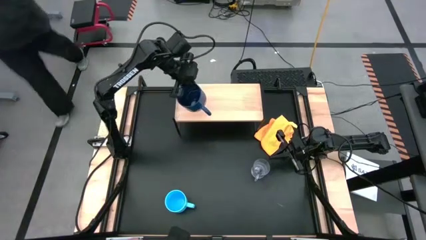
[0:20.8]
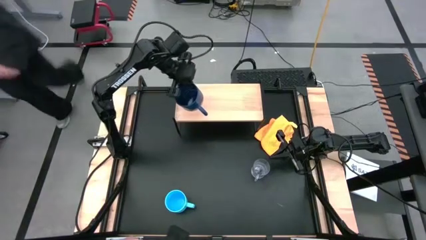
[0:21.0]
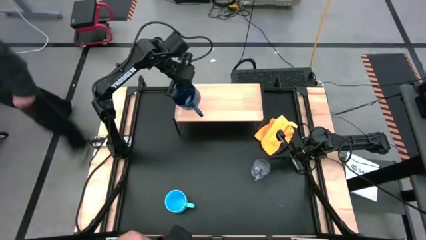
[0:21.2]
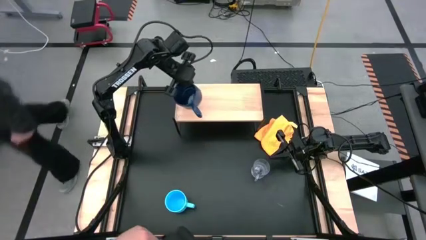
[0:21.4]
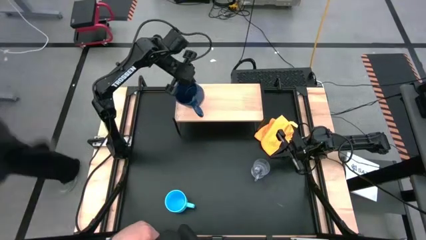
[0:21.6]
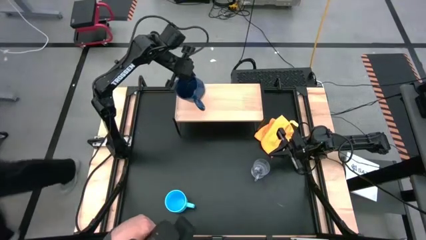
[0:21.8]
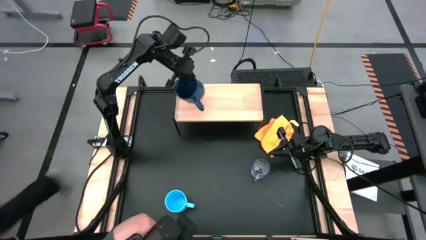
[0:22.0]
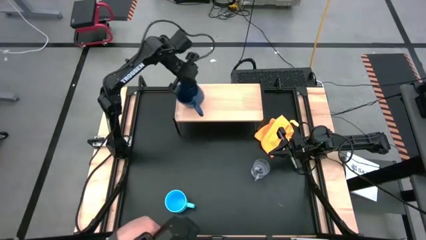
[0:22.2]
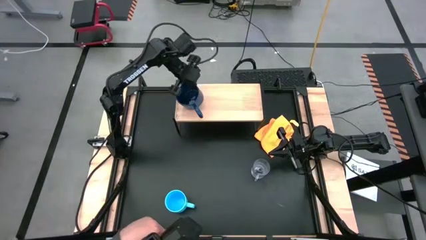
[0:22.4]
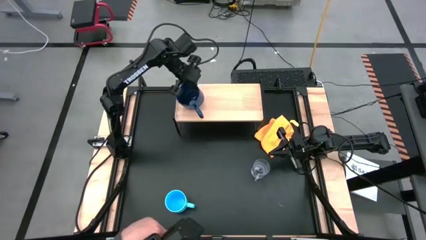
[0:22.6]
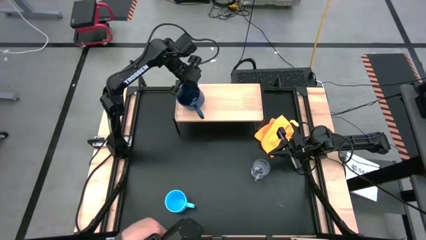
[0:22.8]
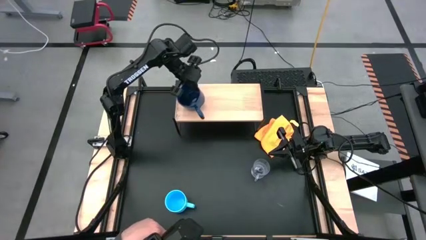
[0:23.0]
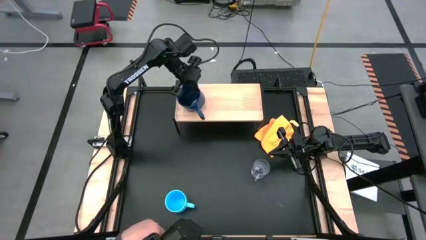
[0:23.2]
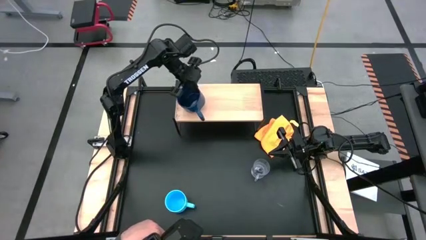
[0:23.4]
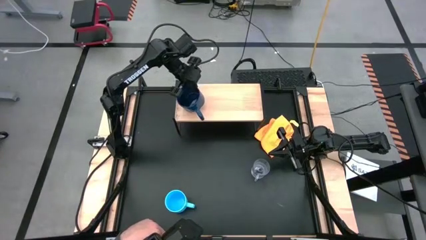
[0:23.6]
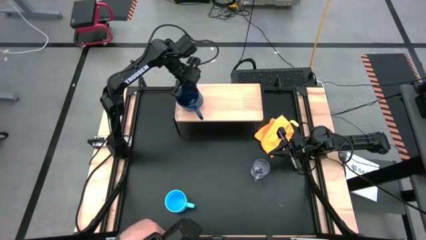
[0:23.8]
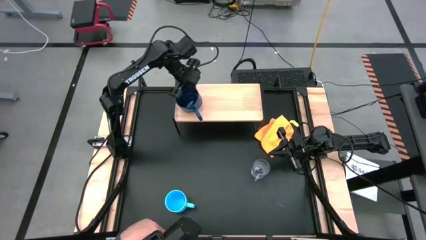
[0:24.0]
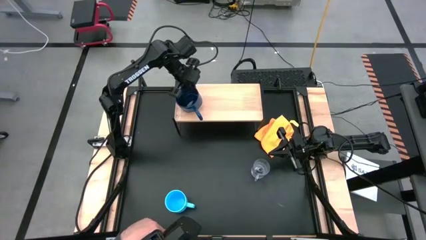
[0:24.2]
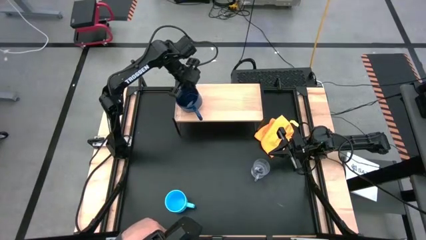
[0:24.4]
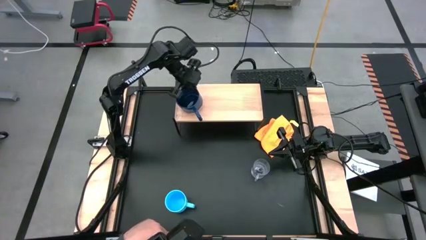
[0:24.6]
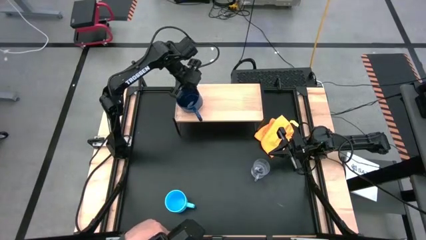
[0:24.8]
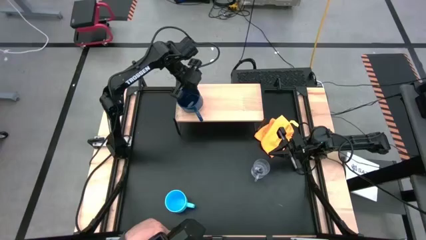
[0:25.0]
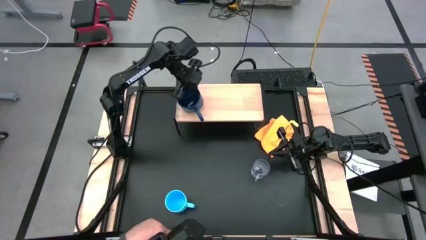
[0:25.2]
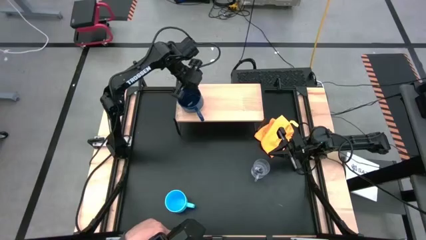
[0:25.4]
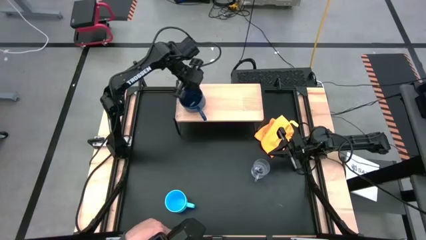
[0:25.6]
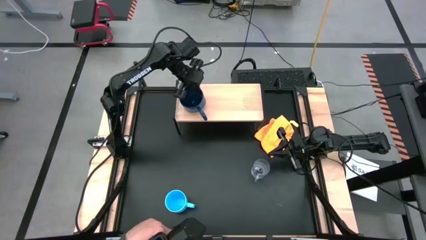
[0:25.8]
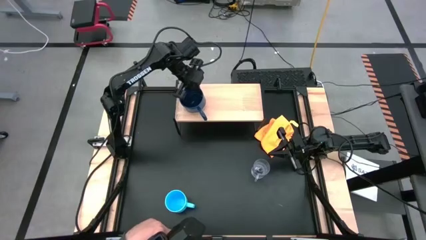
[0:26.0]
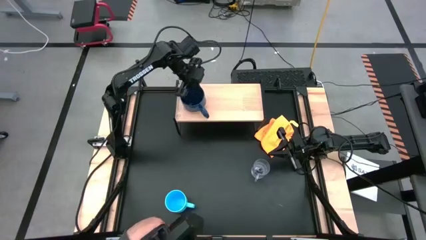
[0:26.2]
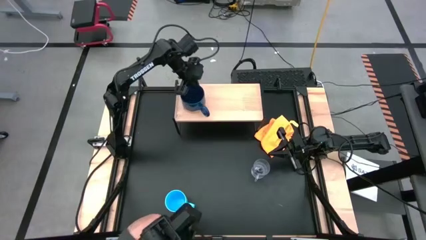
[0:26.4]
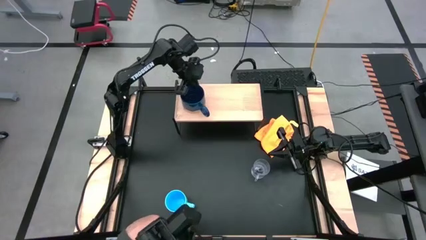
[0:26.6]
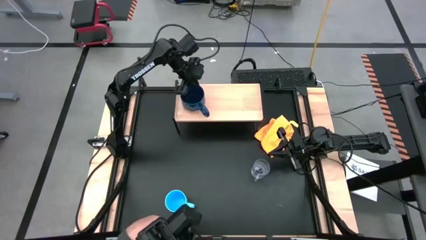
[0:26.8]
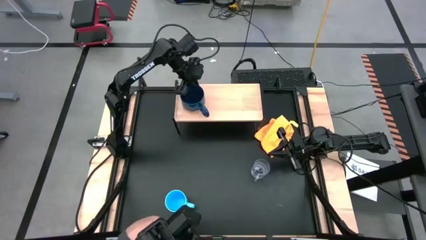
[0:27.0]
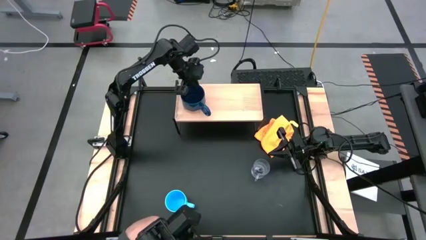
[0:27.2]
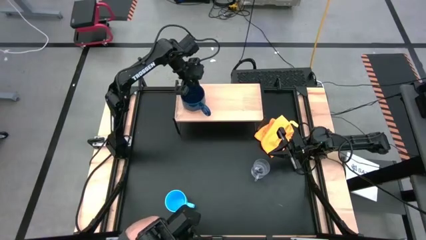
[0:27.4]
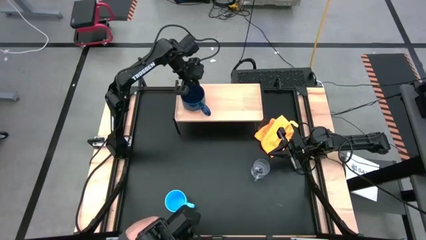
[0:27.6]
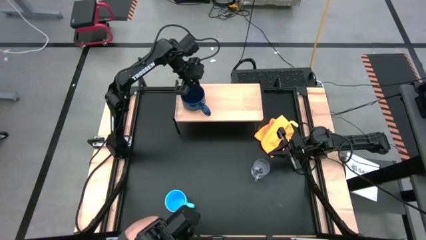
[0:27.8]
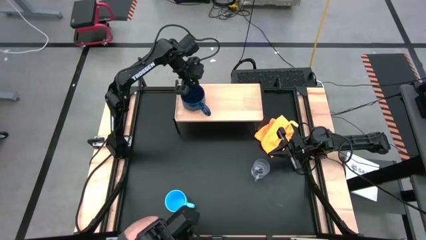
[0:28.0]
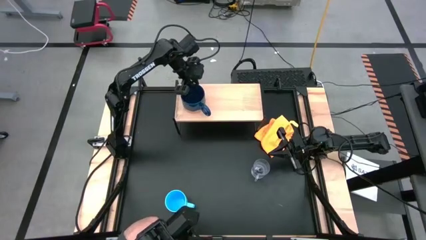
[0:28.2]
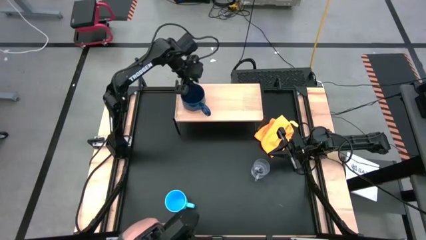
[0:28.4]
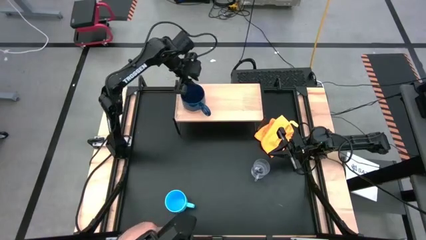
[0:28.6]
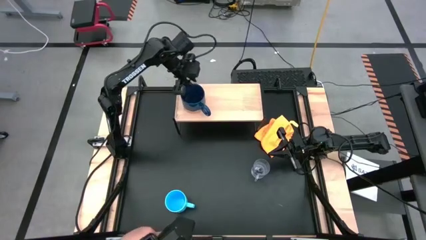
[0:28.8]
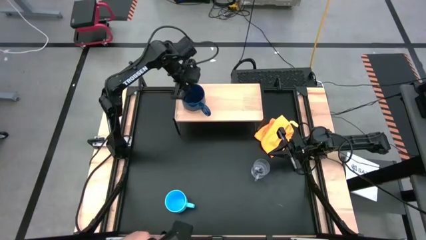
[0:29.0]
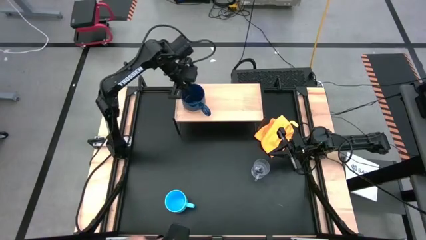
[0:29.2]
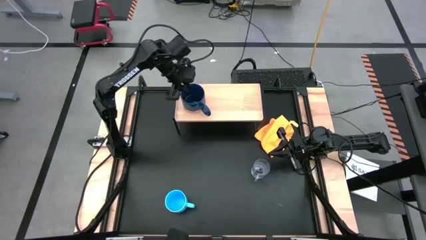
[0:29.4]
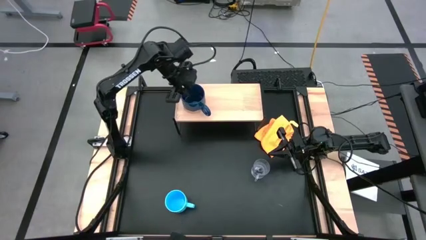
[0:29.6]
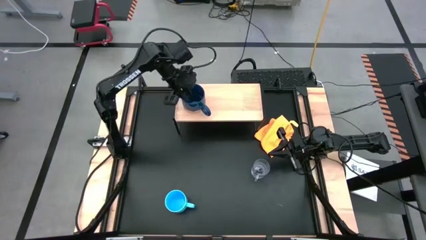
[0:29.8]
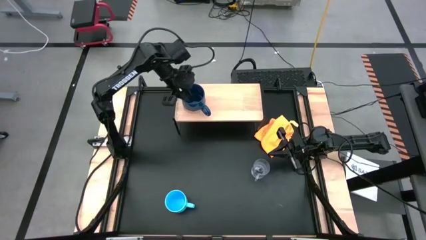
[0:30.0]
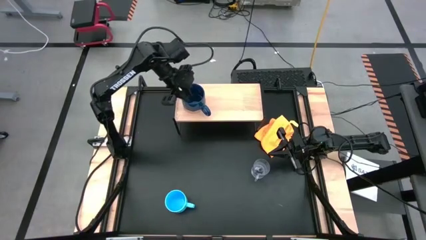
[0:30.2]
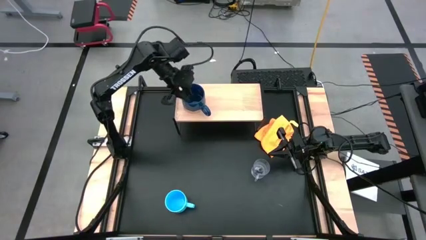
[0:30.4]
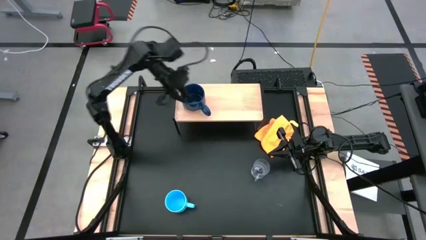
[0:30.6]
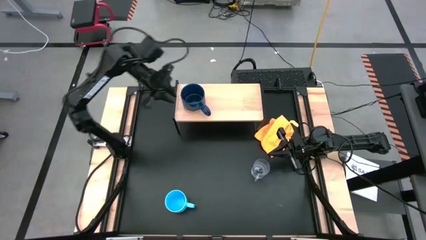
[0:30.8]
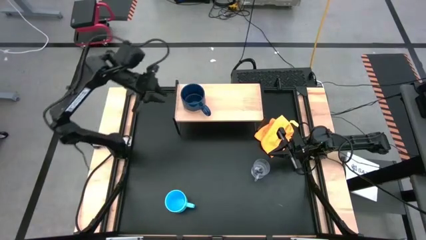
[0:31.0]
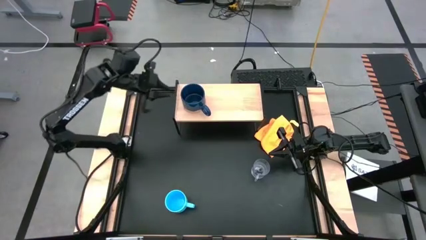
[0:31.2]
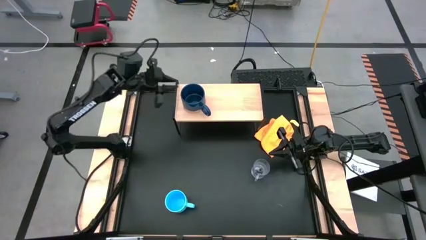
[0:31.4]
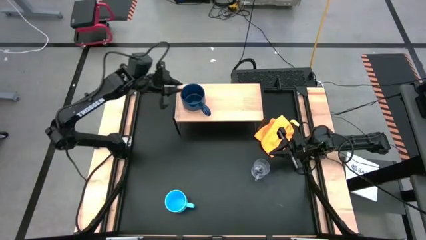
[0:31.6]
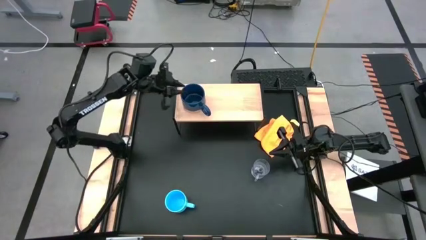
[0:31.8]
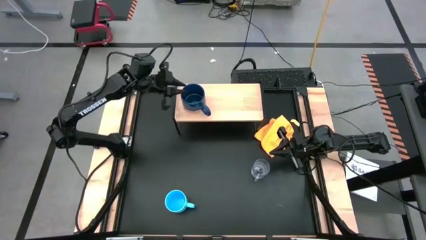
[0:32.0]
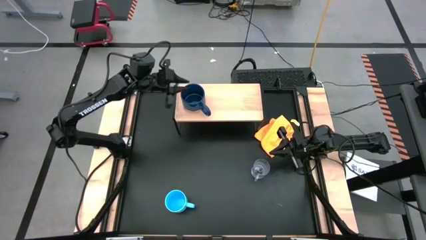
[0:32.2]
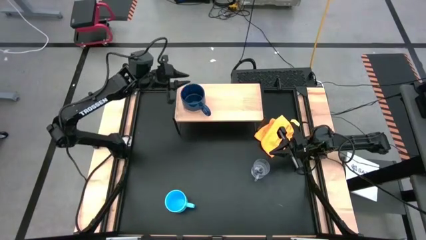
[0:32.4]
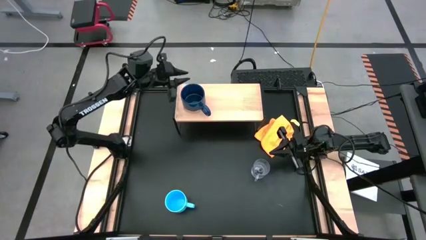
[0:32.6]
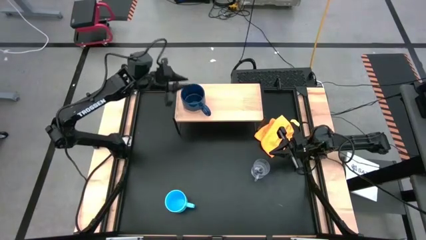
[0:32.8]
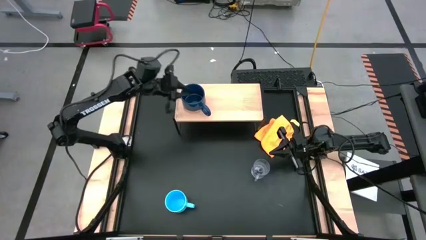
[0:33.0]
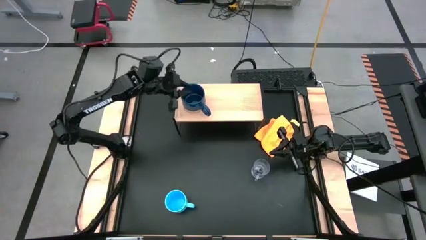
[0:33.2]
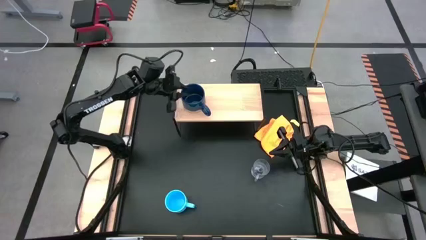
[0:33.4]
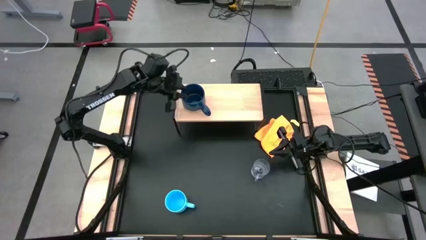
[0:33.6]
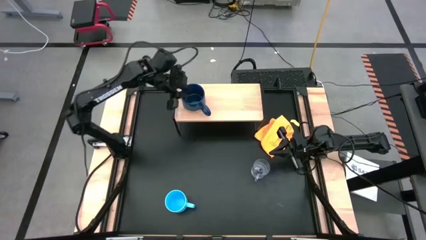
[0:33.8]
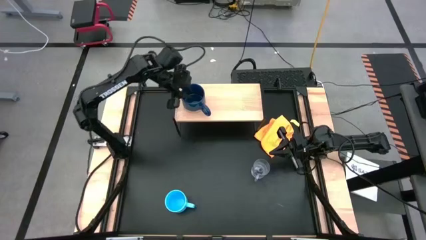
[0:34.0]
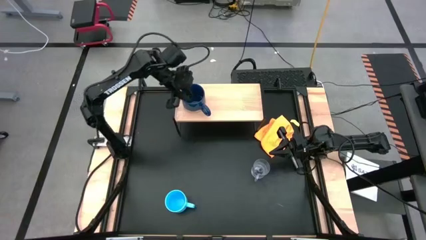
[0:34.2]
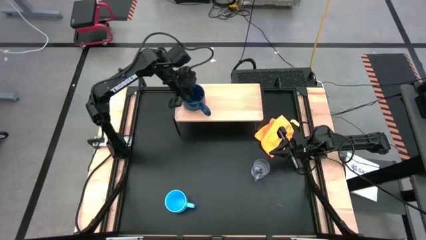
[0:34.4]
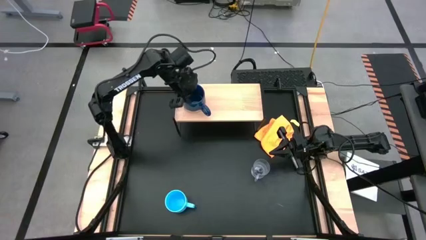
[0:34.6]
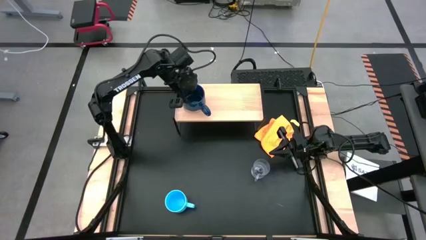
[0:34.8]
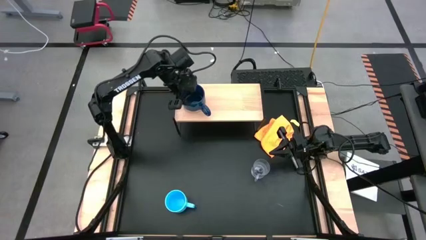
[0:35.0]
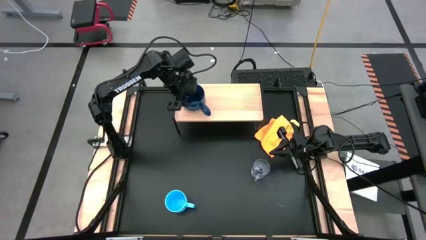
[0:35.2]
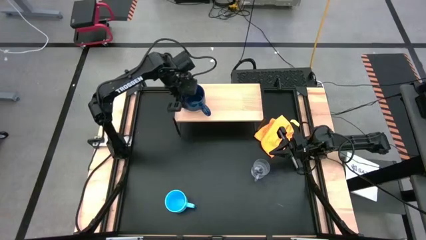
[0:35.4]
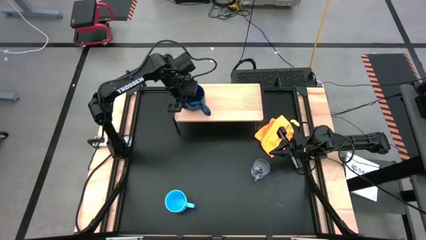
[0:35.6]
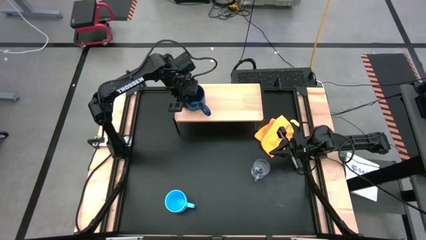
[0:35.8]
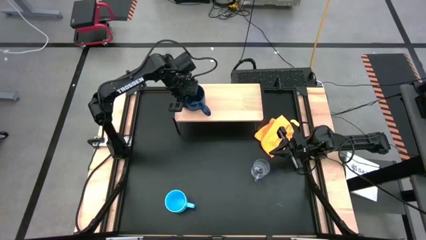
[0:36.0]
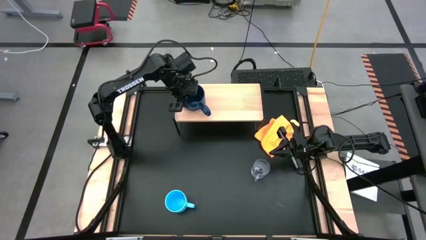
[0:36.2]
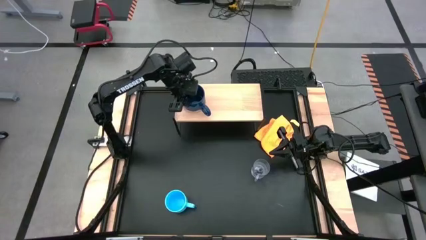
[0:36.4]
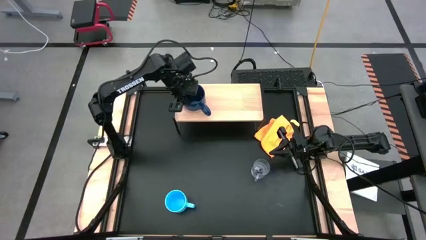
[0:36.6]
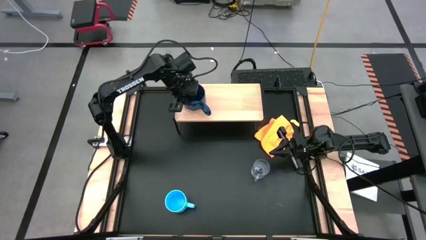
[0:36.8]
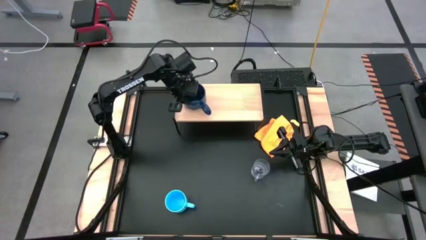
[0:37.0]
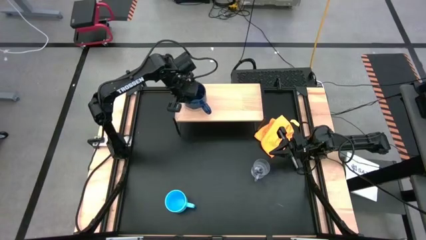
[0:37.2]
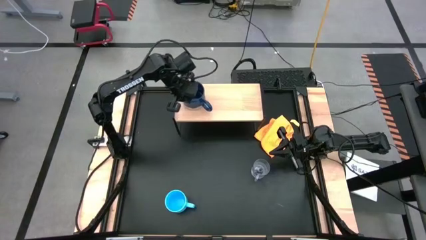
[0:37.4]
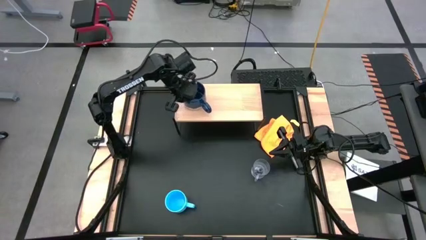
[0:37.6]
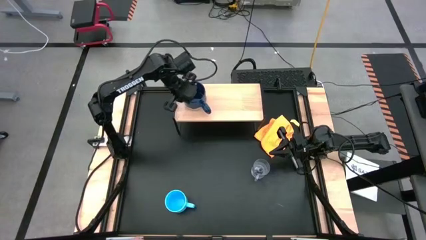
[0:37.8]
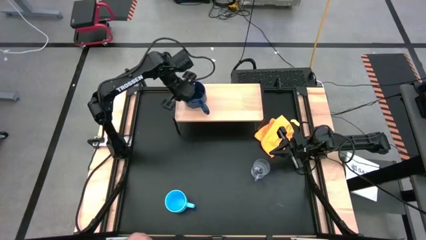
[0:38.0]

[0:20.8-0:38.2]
Task: Stack small to large cups/mugs on shelf
Put the dark blue mug on the shelf
